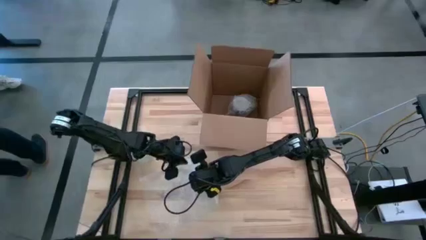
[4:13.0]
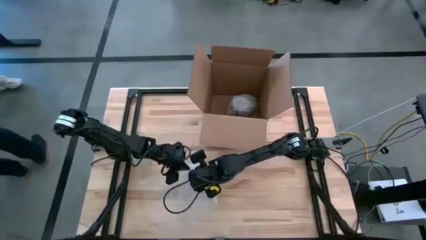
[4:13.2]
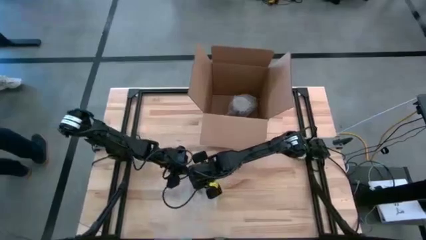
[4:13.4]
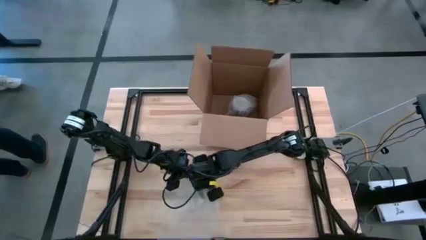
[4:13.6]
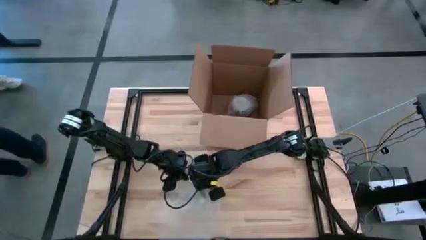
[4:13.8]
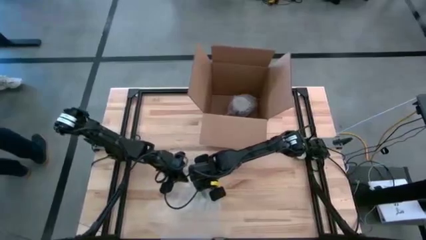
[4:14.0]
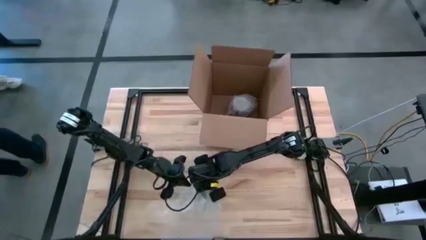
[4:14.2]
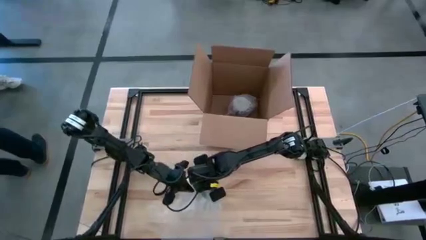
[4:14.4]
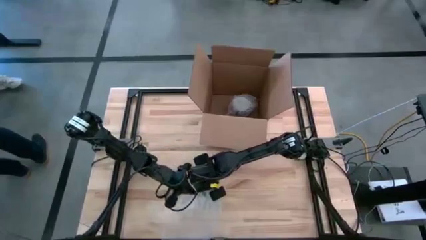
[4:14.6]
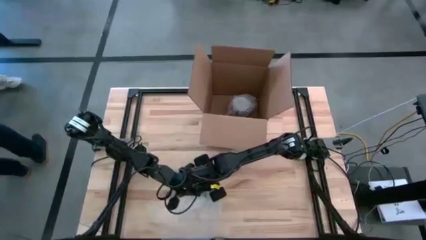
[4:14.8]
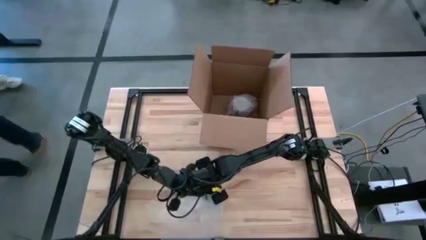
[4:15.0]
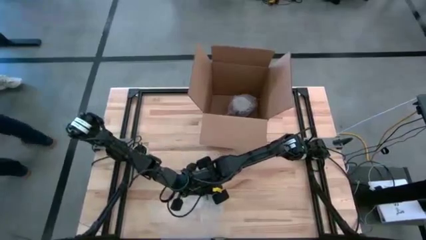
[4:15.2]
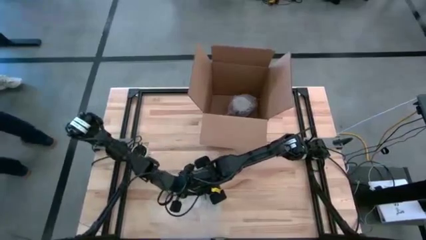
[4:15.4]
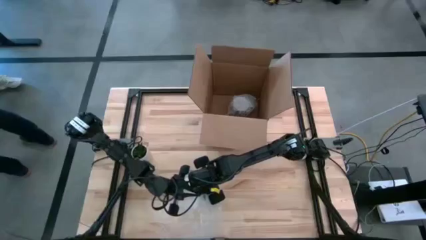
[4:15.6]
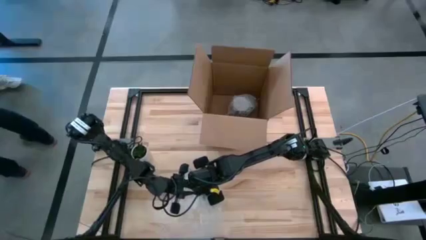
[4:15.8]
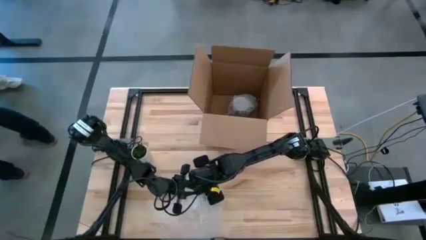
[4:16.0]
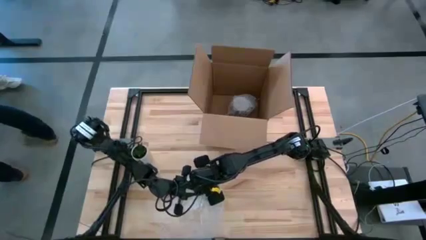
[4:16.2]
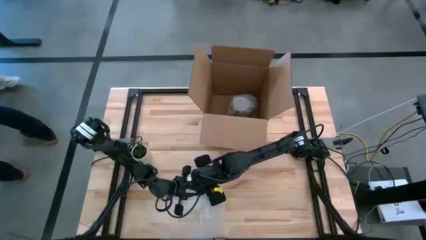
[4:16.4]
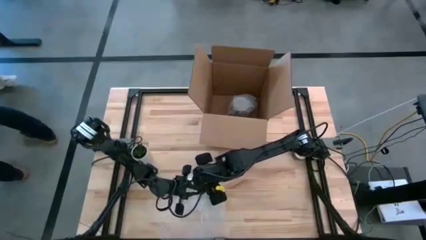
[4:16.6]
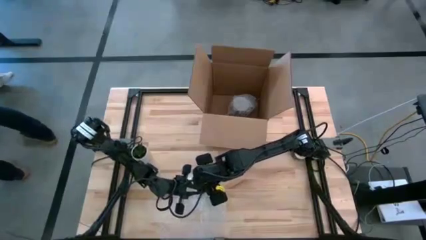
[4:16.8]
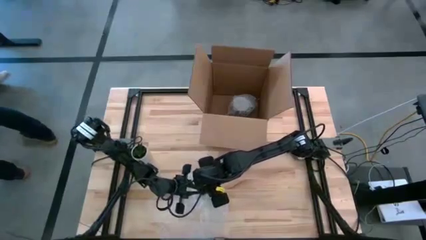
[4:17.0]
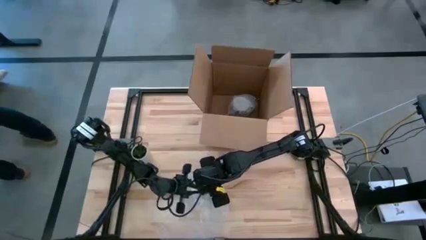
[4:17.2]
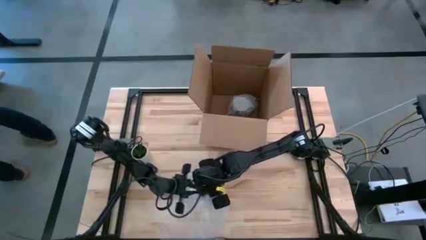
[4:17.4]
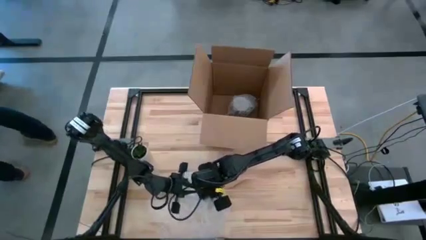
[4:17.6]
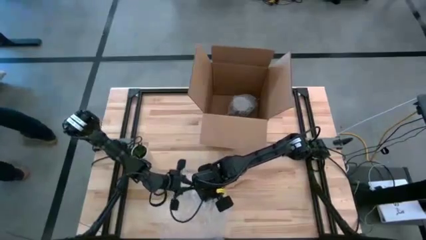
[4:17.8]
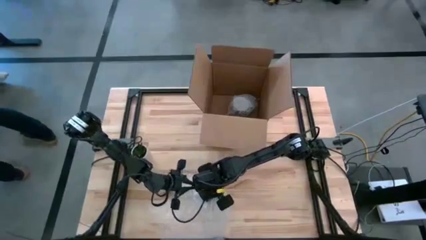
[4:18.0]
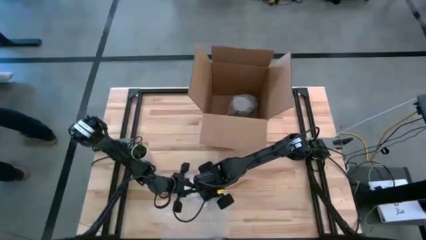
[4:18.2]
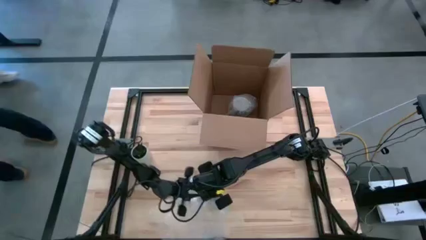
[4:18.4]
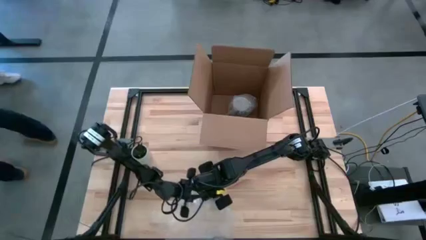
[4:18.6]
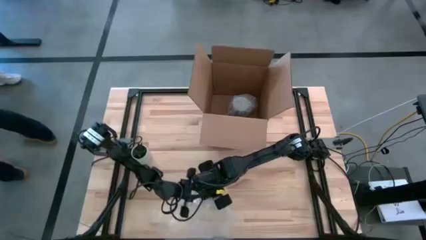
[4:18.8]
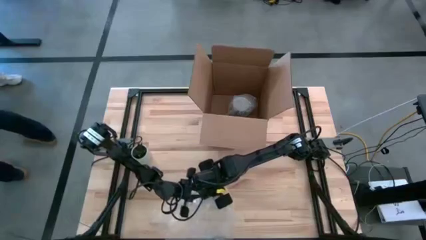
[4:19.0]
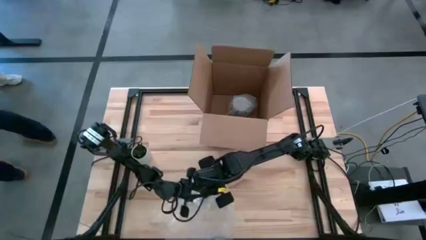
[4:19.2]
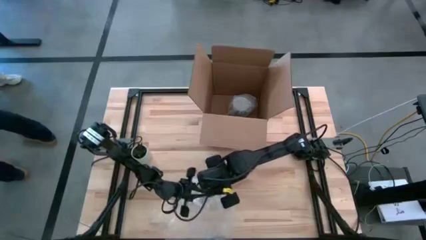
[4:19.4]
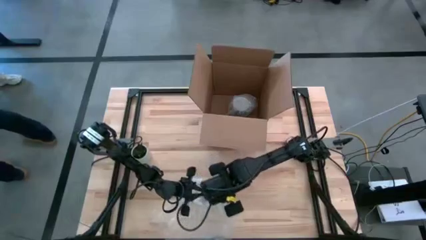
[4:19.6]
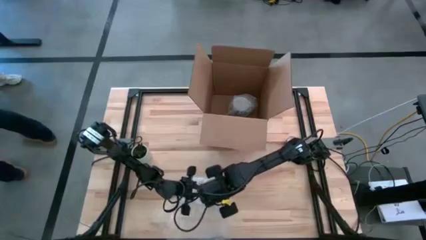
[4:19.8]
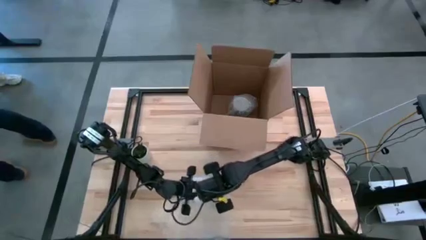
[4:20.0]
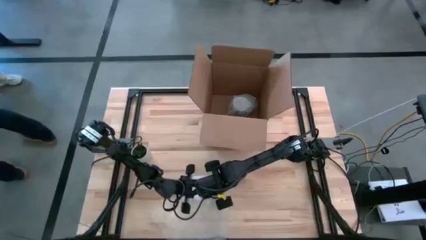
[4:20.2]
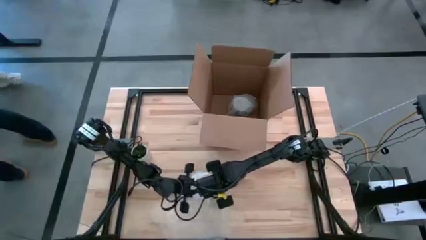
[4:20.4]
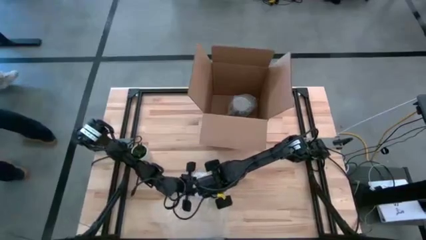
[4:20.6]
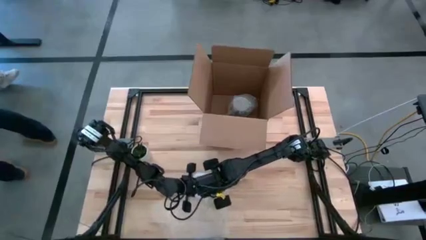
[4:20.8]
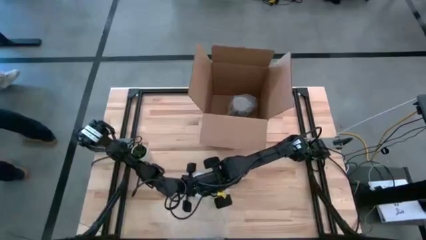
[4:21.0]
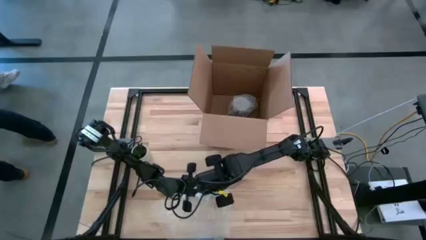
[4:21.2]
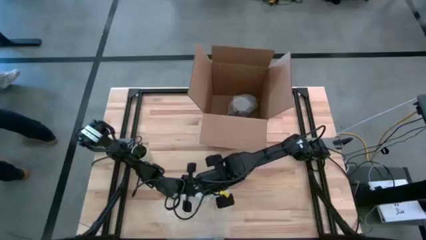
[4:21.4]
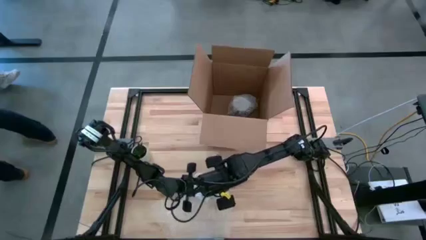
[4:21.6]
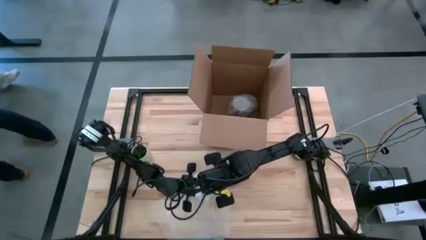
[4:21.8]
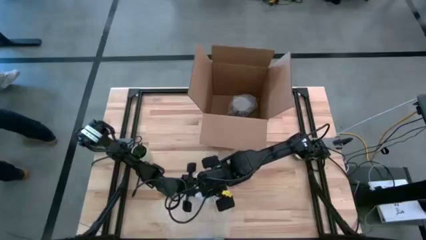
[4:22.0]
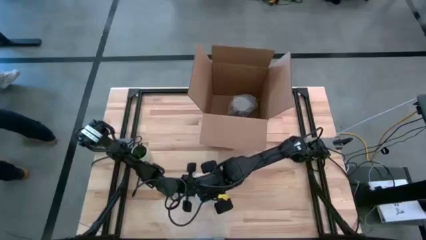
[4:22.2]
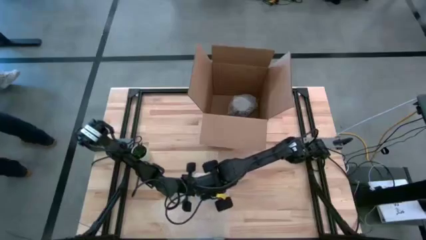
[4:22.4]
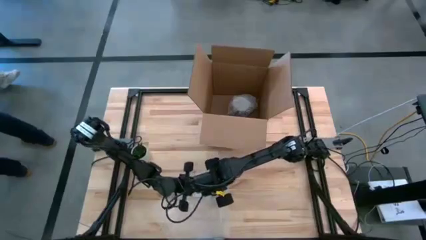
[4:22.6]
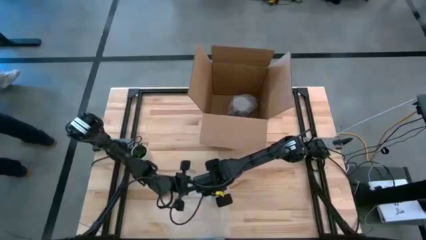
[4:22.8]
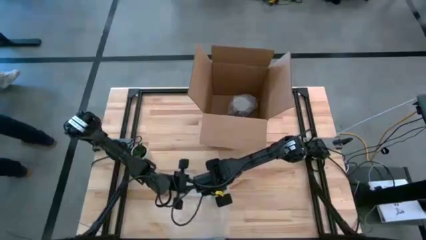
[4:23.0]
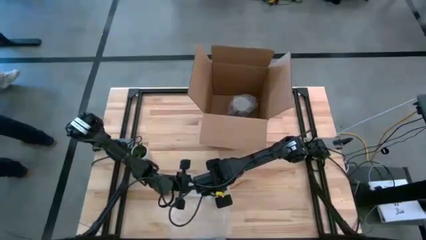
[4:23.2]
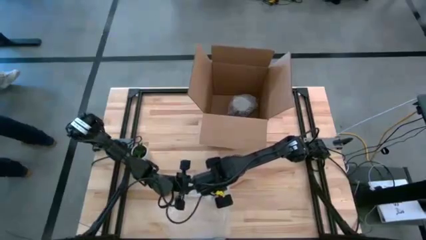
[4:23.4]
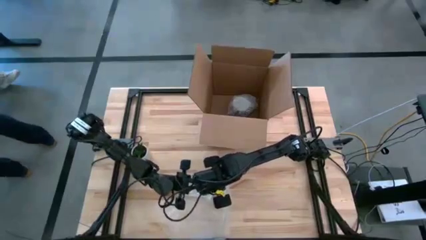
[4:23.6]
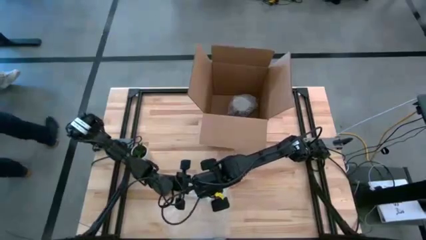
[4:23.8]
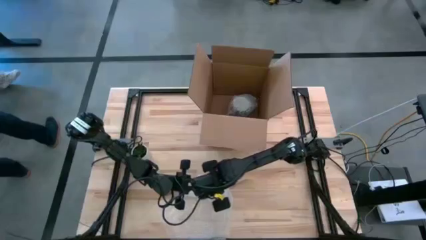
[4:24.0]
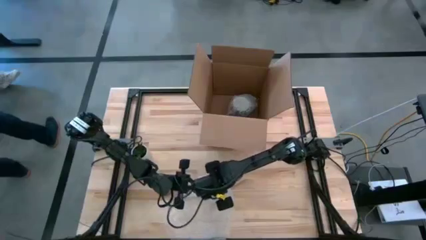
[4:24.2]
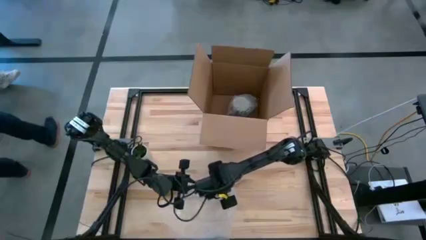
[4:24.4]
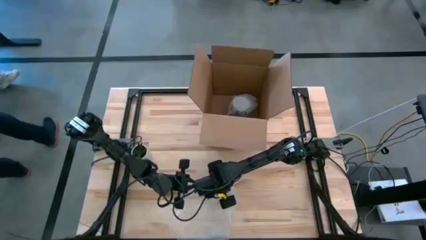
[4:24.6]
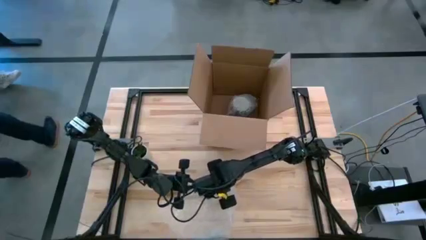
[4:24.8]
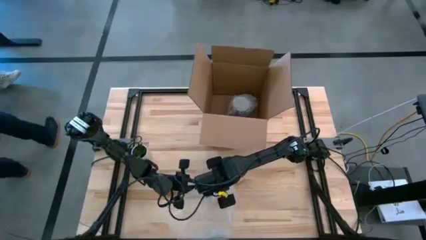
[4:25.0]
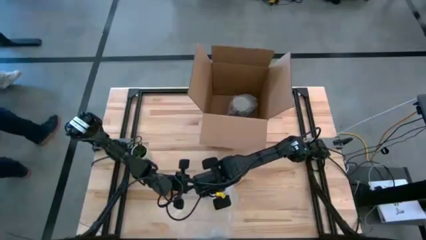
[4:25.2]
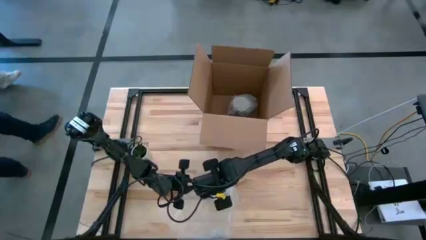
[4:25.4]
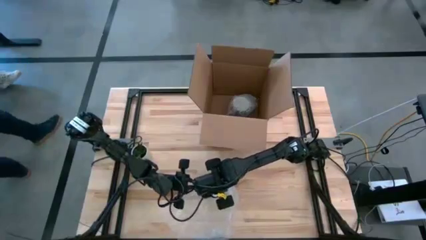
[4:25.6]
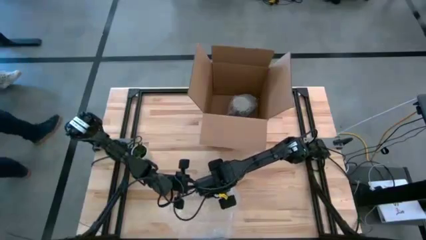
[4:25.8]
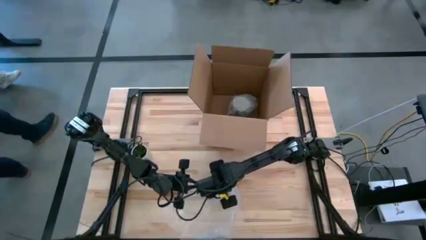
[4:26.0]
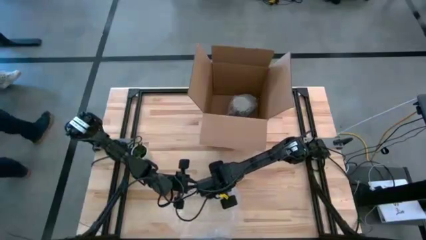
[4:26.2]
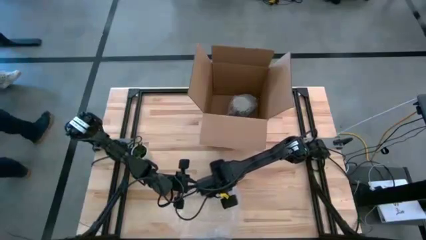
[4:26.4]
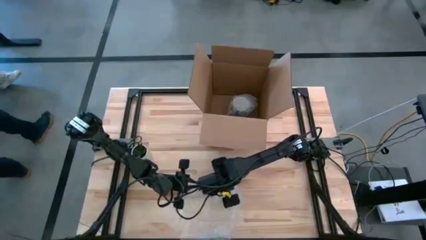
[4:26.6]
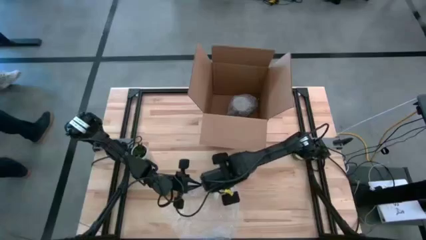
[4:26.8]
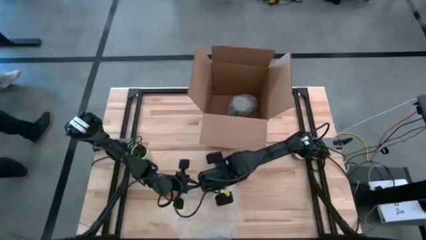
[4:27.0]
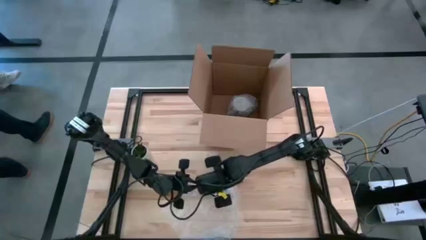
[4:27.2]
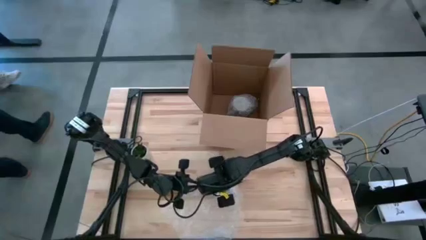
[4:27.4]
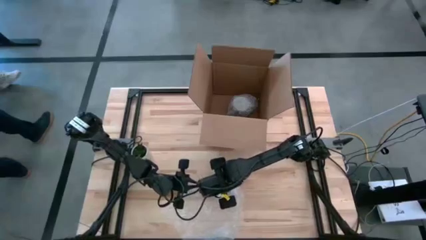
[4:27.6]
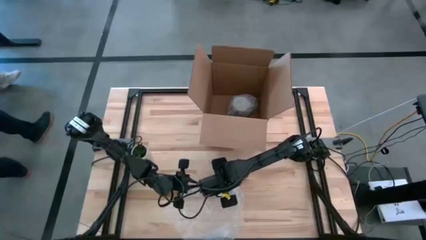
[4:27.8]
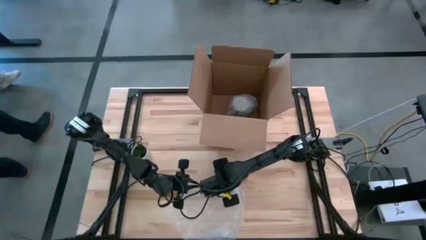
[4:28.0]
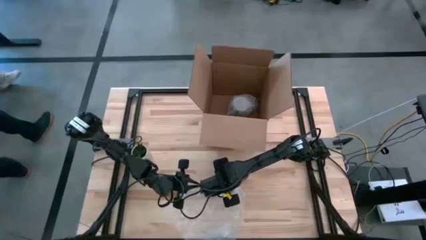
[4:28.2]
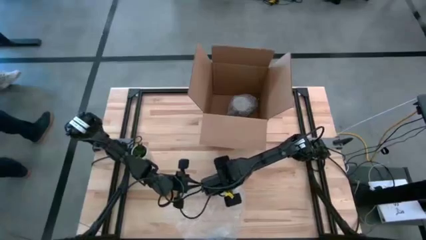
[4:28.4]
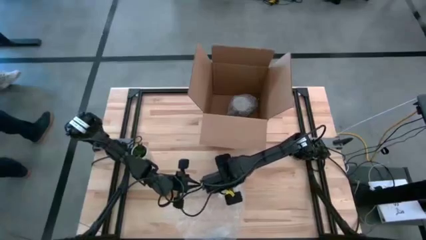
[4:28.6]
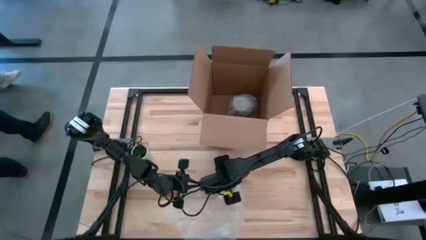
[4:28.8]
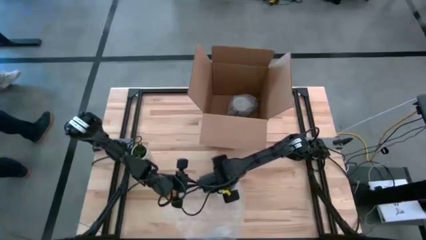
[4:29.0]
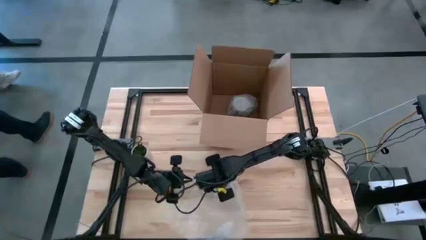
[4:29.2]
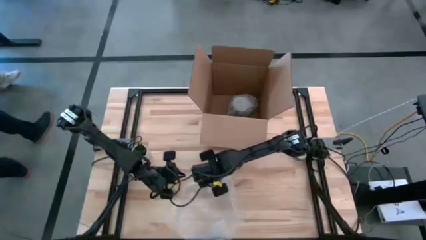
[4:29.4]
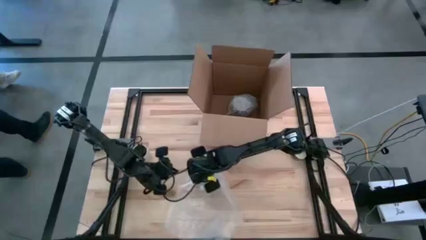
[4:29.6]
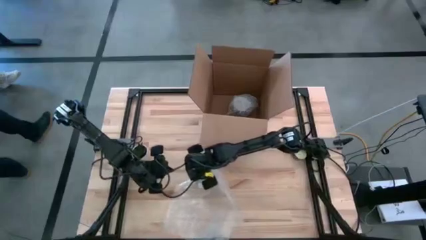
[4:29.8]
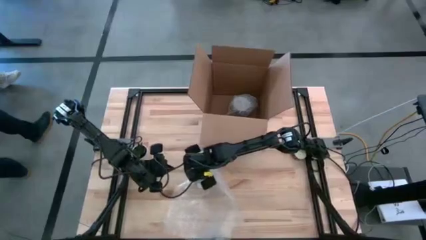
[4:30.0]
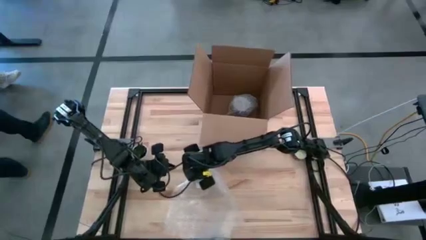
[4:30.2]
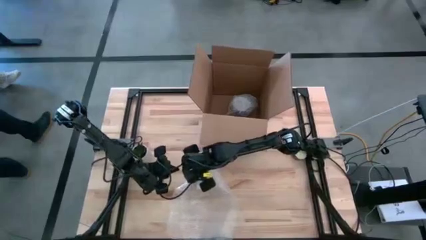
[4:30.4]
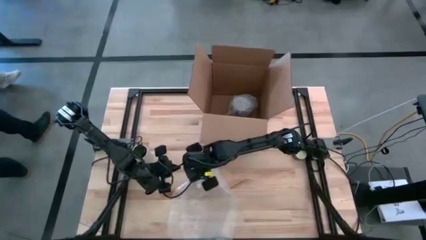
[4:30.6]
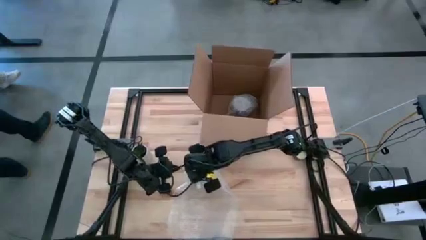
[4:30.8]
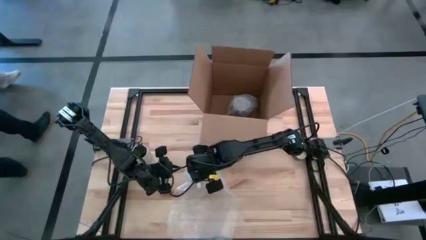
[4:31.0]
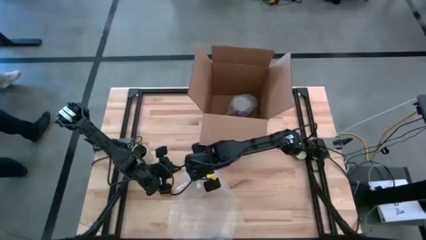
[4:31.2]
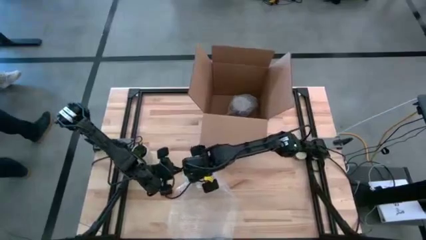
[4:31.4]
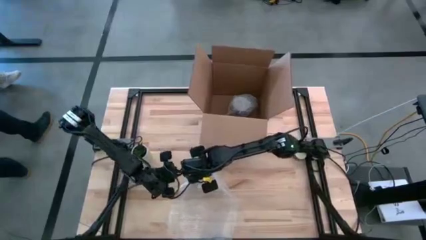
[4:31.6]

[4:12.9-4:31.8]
Task: wrap mug
Wrap the blue patterned mug with the bubble wrap
